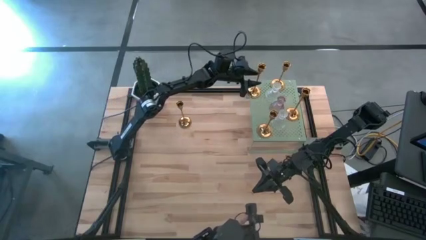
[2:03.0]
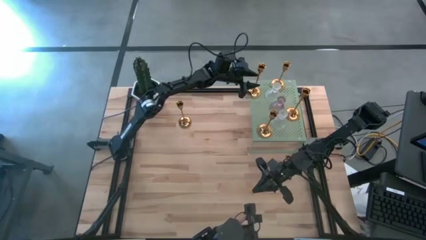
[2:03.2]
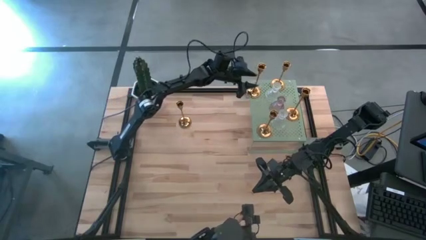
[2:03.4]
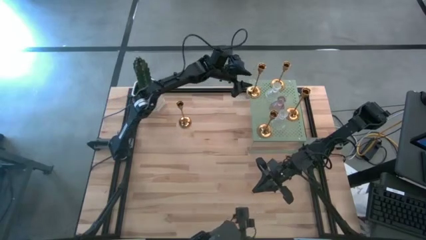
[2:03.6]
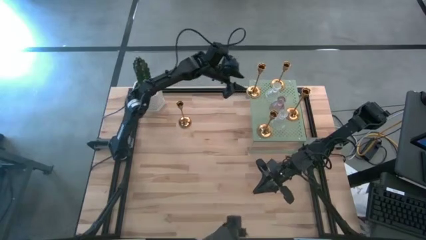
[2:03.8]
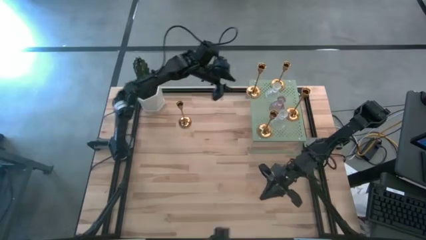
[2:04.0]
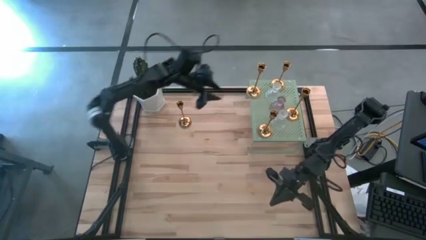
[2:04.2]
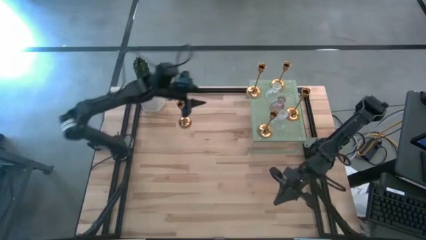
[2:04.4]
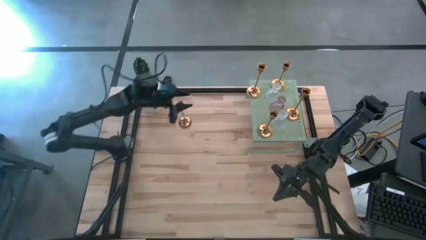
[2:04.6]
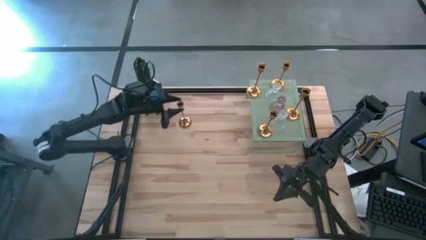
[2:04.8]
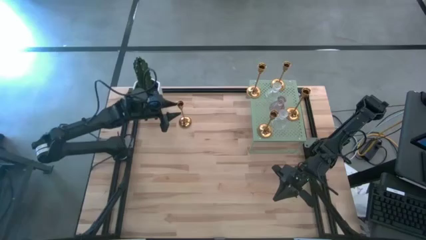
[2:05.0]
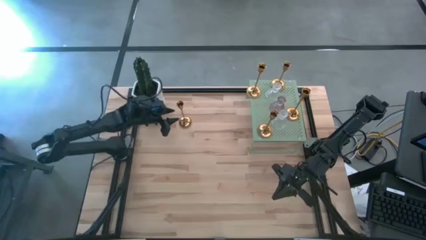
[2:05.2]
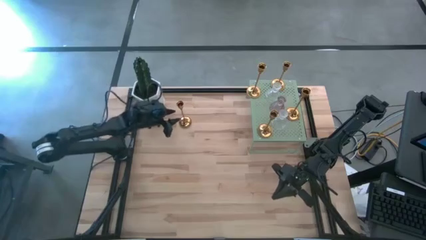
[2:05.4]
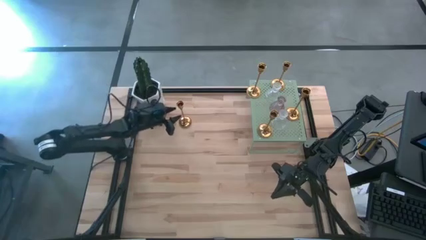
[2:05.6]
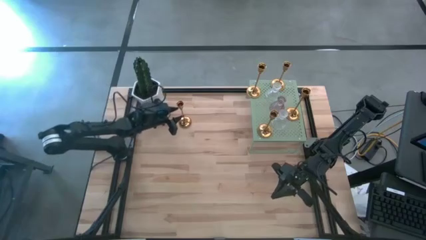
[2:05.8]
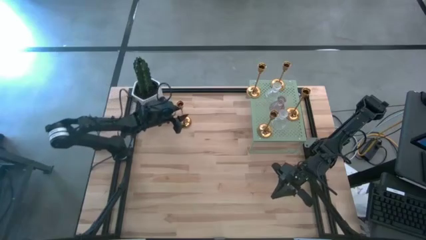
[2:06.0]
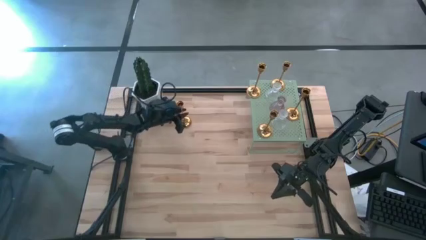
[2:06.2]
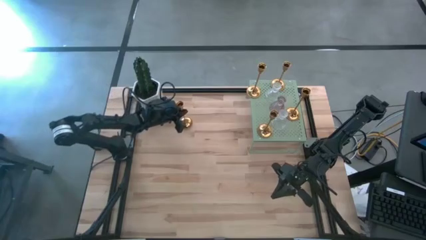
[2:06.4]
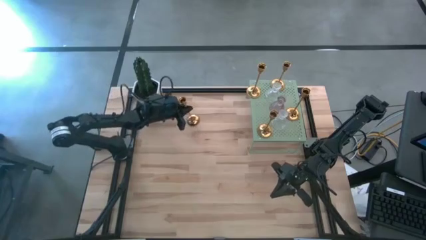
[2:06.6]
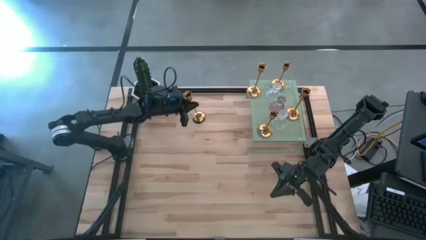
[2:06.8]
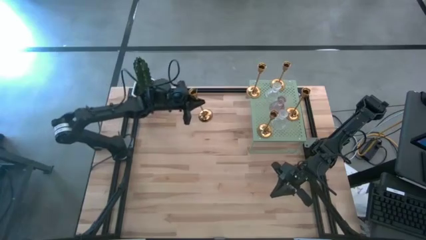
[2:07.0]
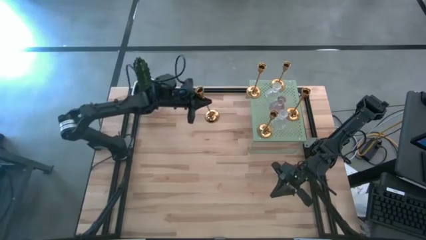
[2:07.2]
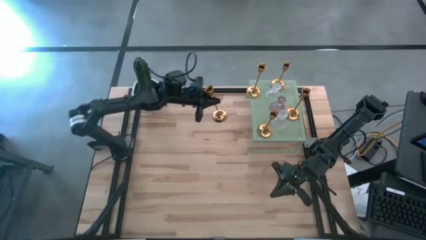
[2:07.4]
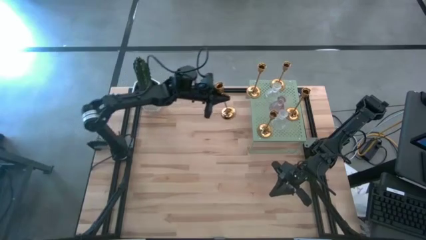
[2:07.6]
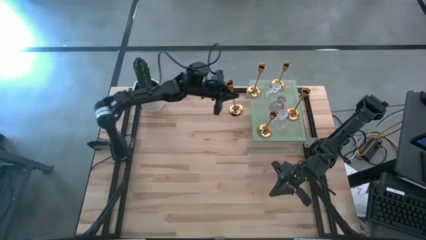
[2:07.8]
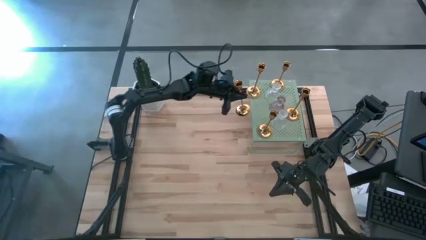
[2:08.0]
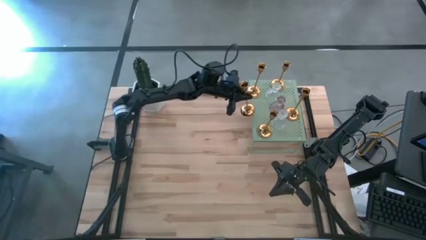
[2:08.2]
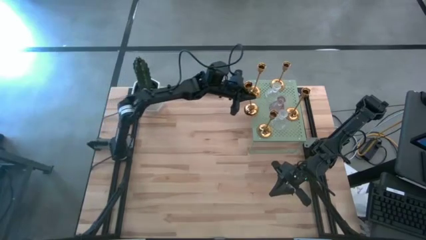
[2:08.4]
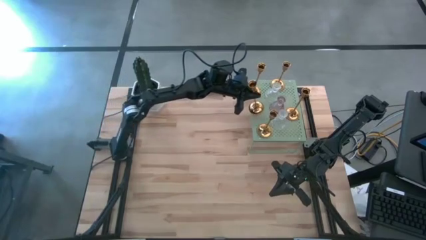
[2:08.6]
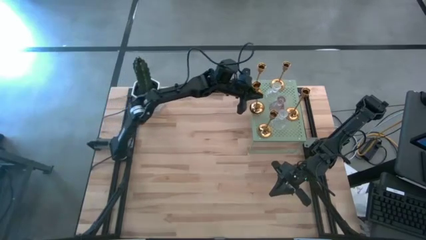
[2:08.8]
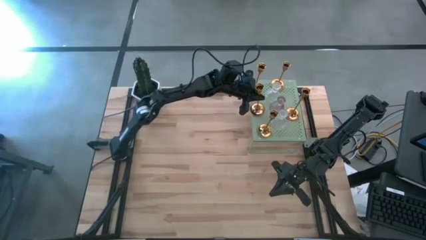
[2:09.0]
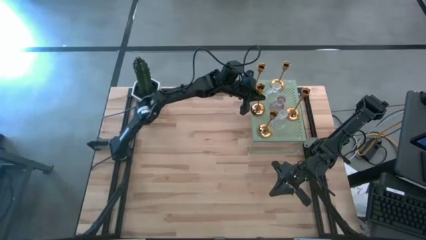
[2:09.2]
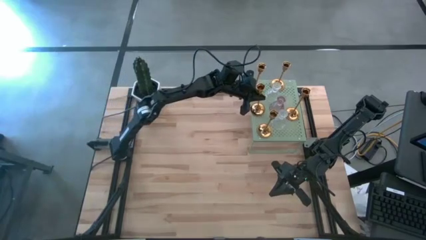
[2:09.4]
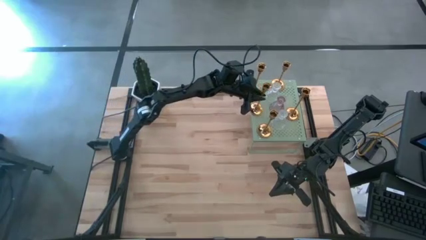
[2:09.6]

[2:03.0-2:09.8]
Task: Pick & Place candle stick holders
Put the gold candle holder on the shelf

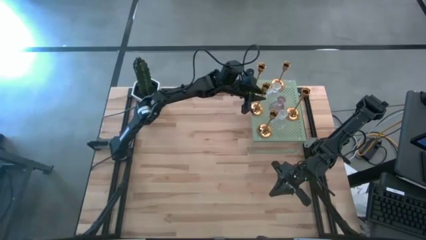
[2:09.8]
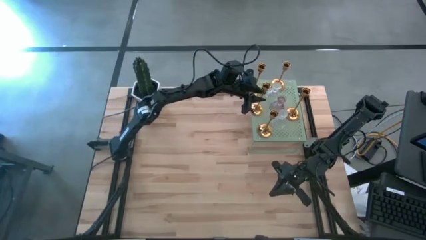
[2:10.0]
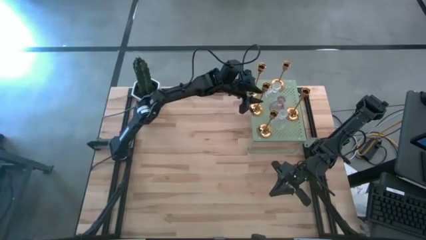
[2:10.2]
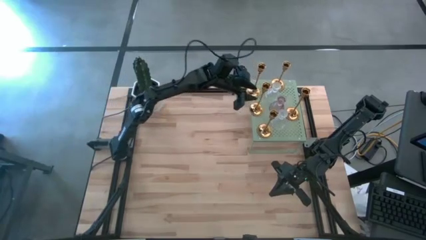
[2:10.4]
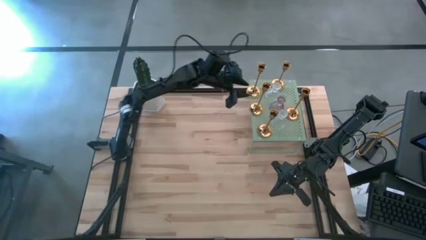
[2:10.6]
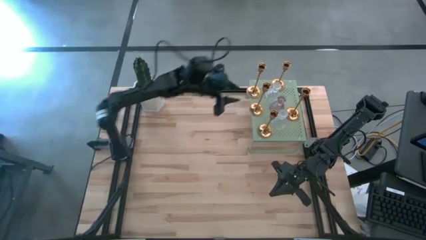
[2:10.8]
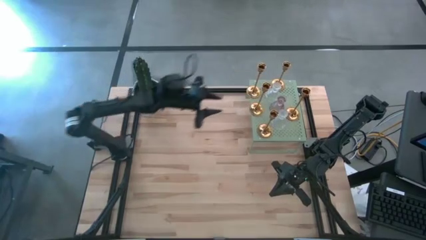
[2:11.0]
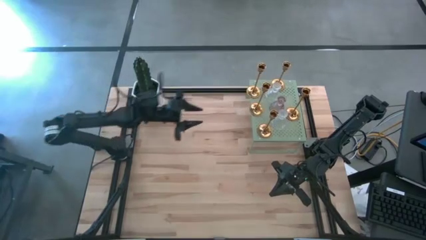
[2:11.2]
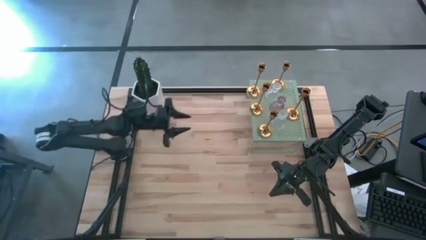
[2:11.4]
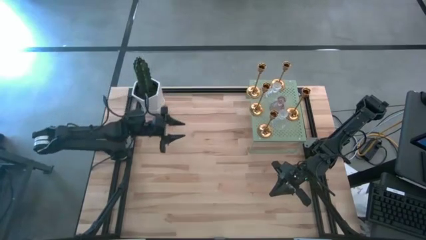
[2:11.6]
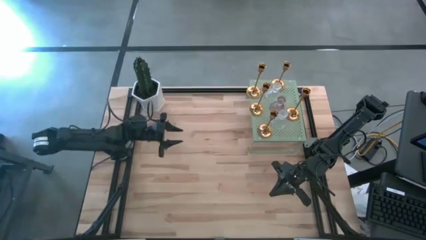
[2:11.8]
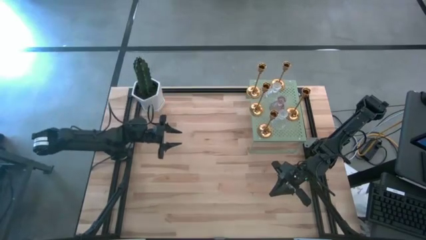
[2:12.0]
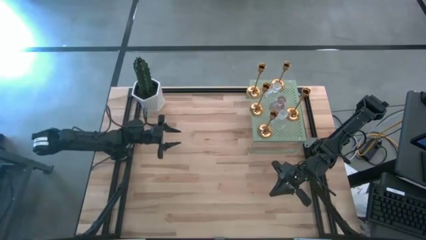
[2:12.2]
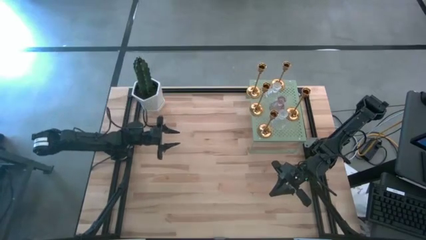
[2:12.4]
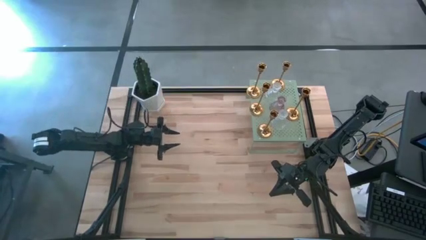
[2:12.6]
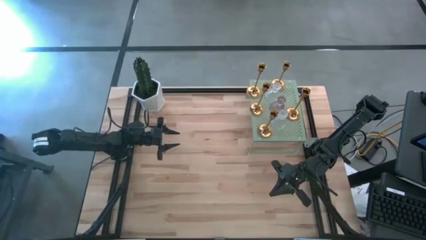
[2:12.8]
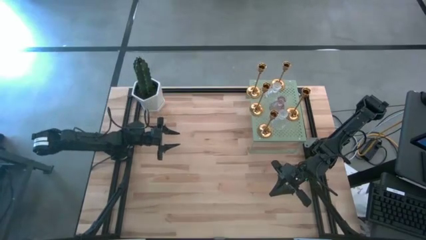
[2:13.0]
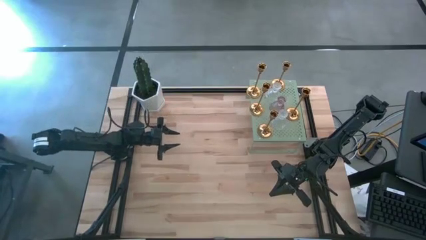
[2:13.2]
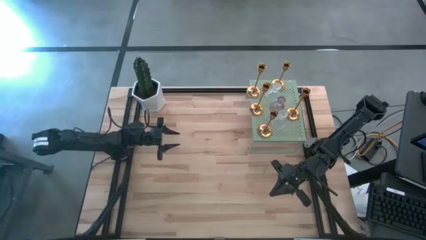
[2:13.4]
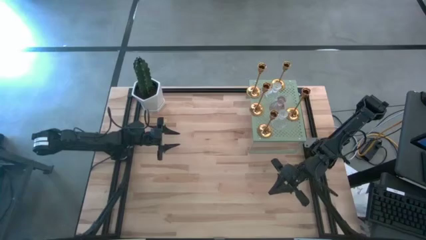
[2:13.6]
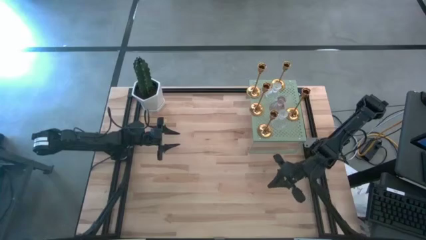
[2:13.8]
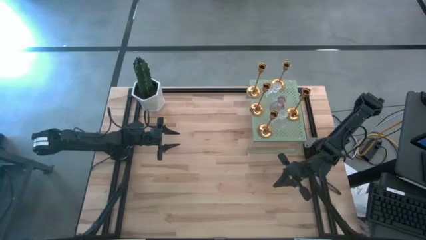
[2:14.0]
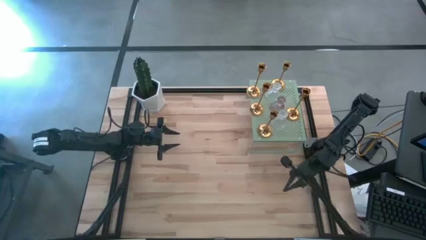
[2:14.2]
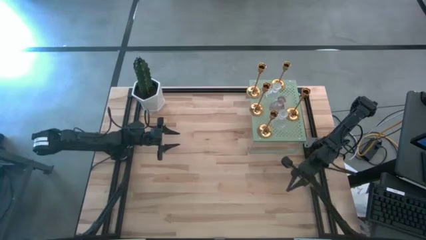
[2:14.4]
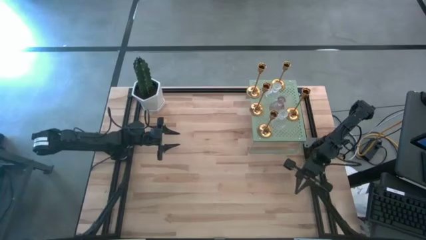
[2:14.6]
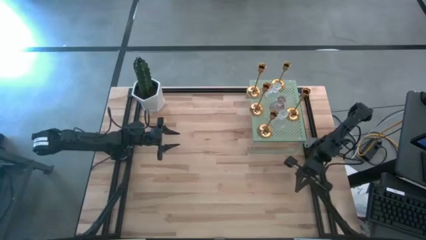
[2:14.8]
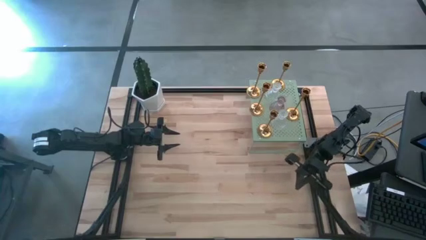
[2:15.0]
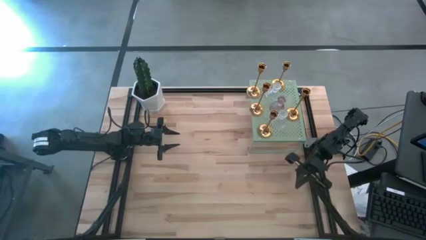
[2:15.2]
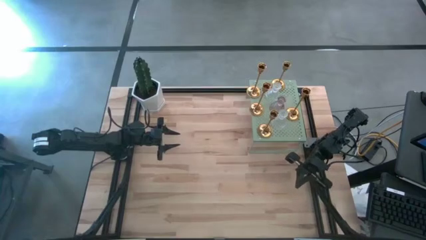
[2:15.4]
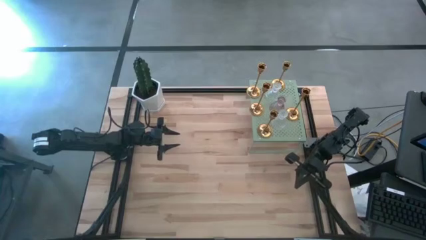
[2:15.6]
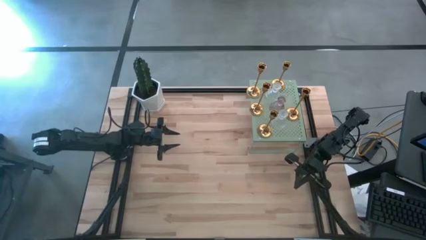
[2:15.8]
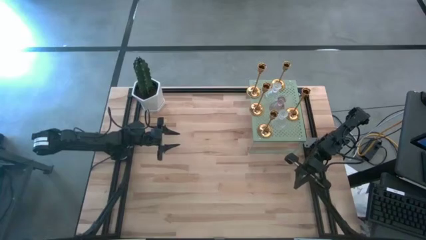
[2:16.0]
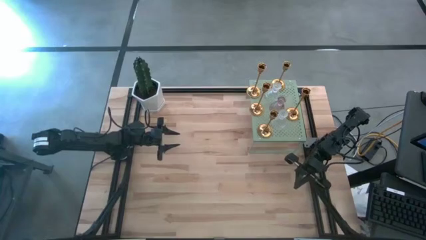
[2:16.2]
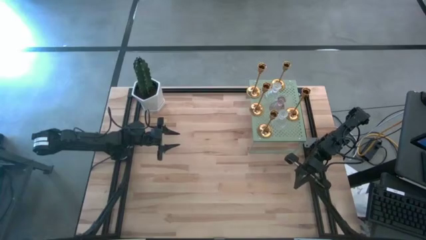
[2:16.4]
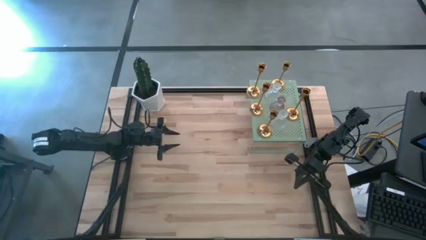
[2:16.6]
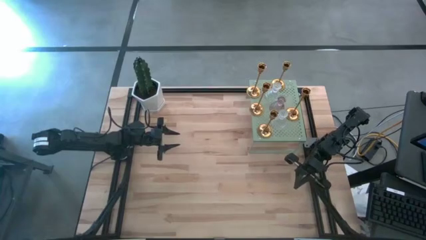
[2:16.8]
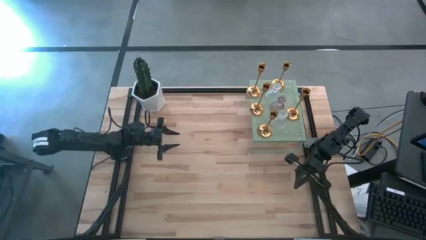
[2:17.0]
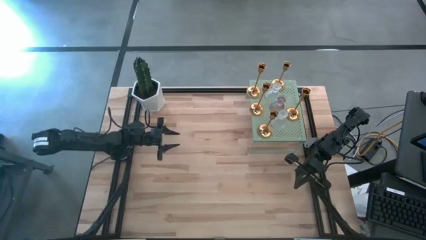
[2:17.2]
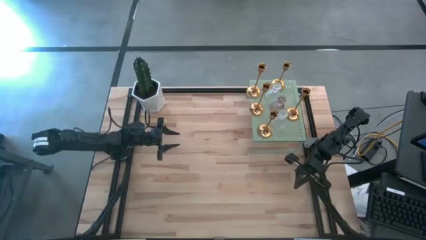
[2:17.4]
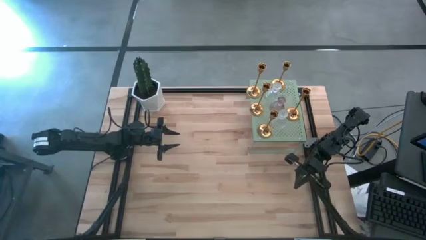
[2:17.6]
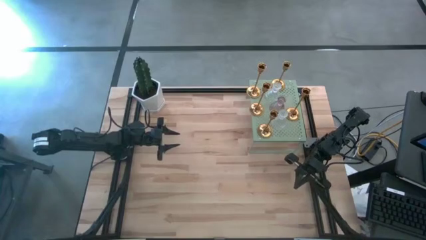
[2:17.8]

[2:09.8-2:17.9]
Return to Home Position

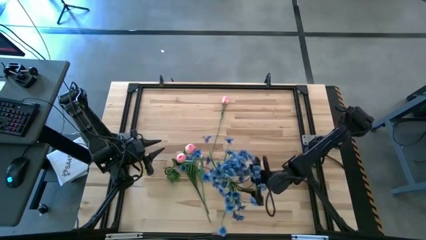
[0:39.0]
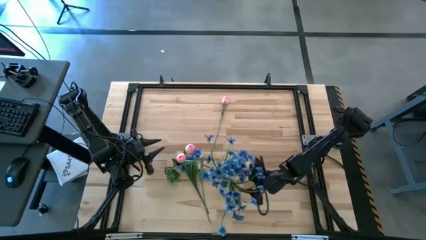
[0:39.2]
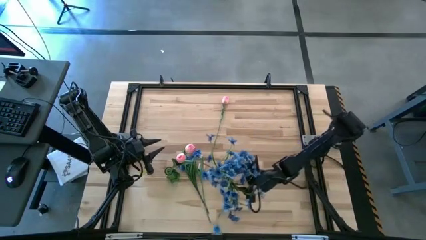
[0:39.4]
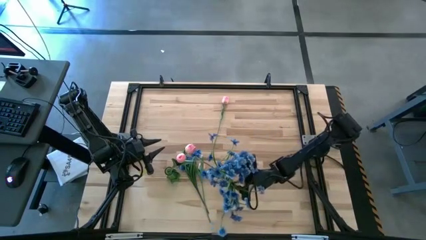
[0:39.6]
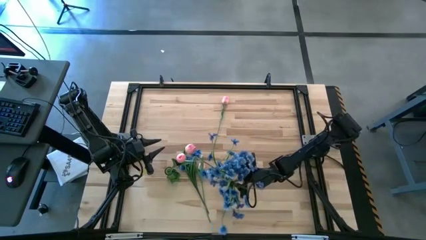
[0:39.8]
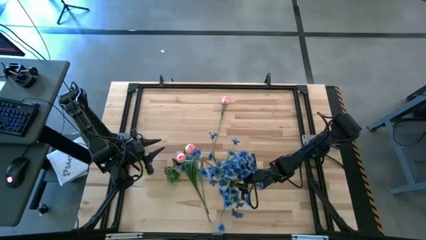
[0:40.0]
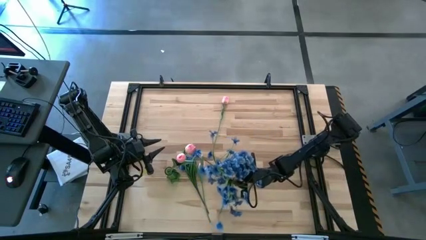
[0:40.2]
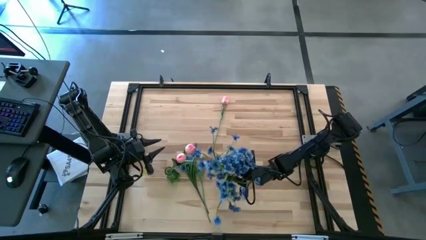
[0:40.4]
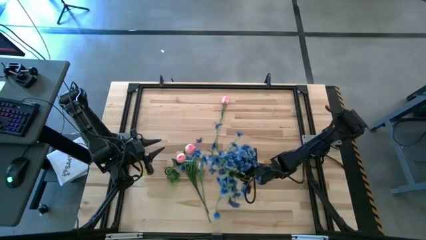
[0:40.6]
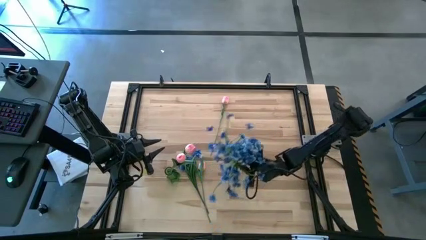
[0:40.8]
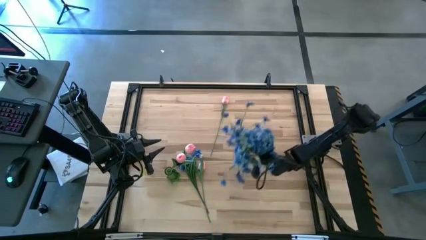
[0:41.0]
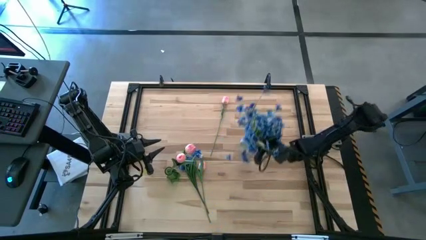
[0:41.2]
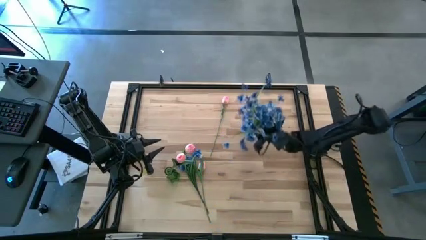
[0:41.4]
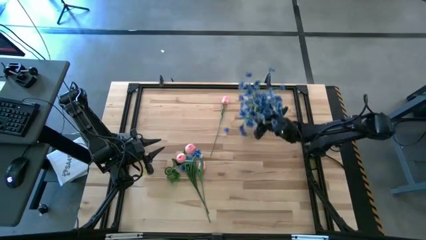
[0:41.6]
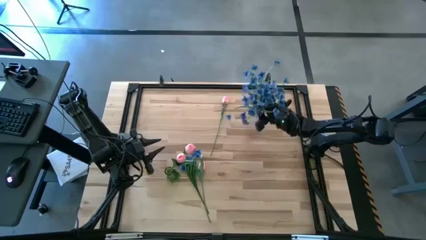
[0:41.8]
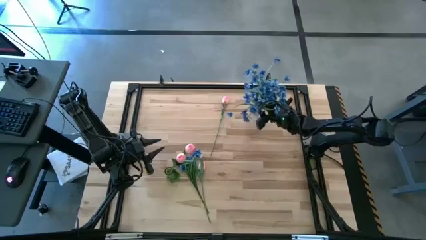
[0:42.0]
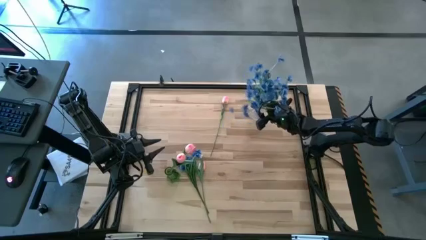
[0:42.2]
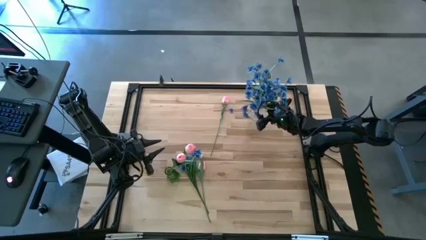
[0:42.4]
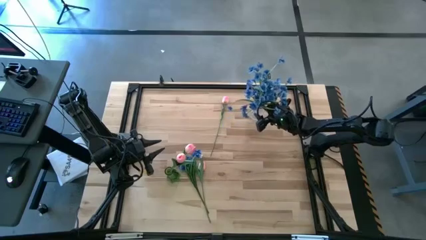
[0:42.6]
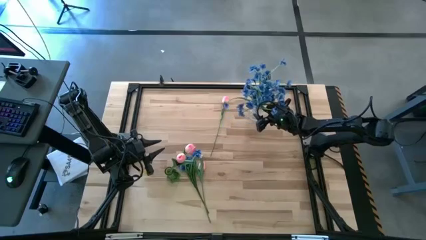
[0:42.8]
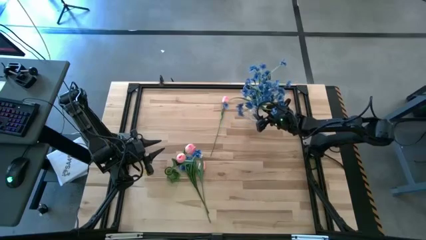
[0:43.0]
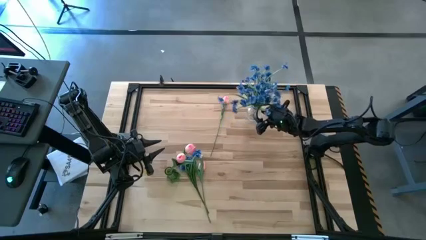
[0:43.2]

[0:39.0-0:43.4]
Task: Sort flowers into vase by color
Move the transparent flower vase to the top right of the table
